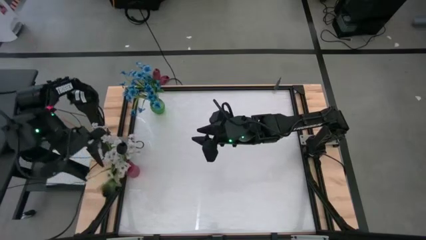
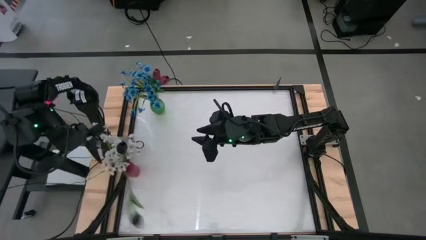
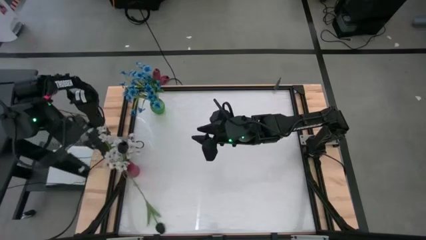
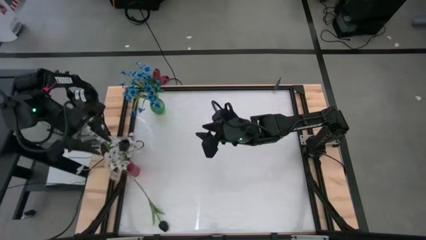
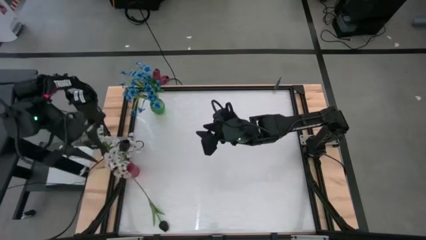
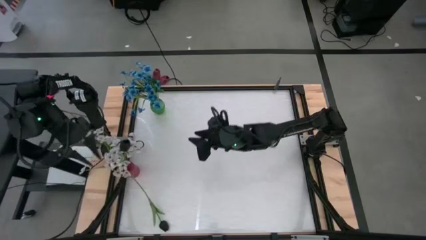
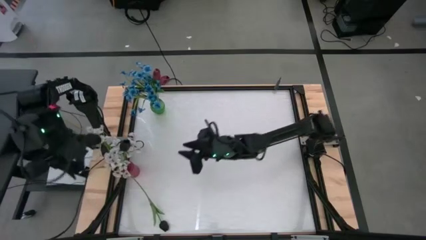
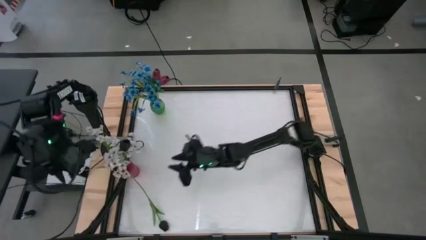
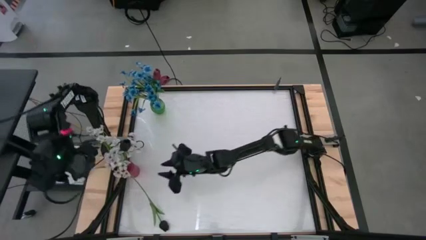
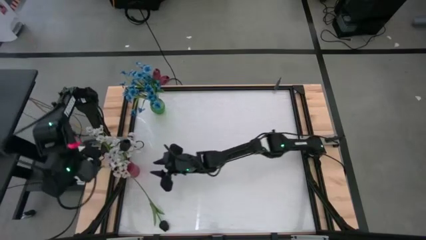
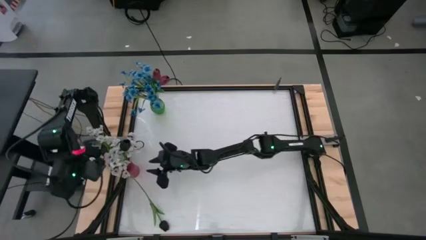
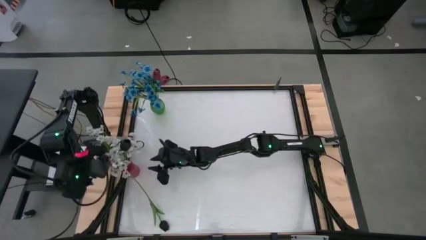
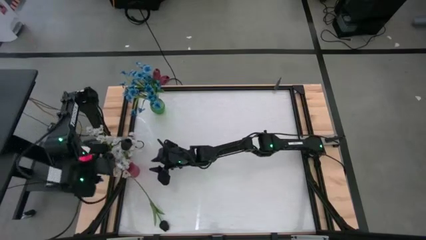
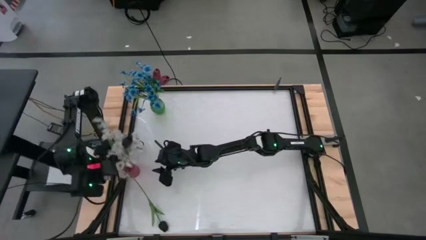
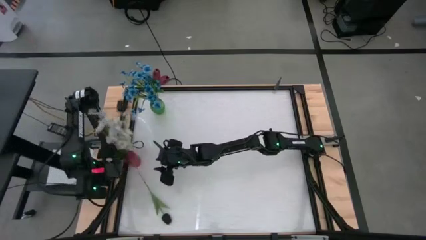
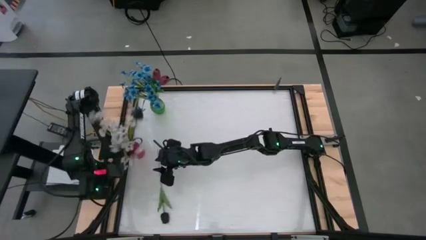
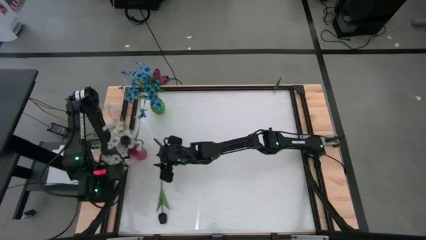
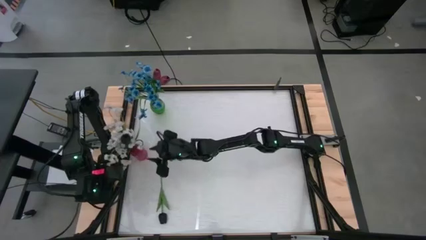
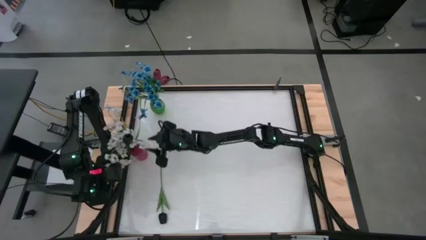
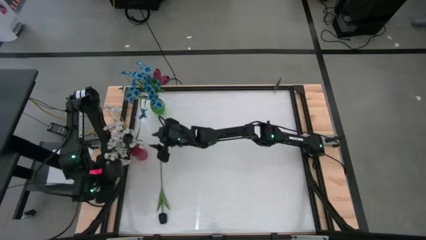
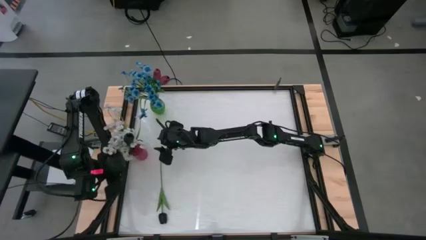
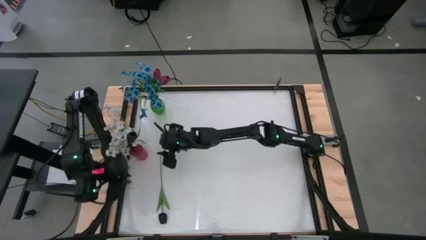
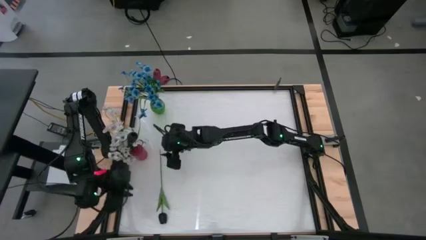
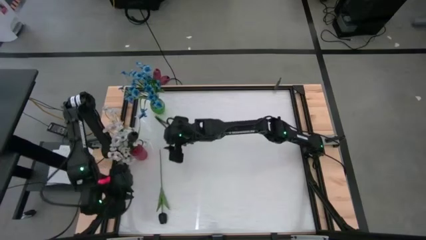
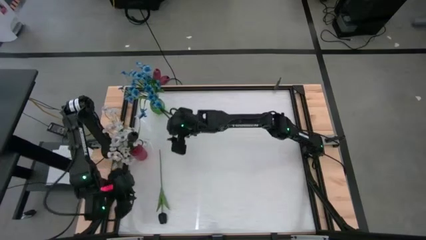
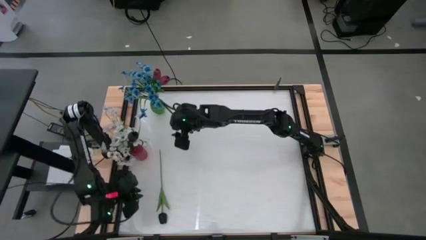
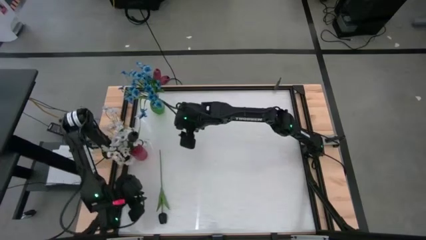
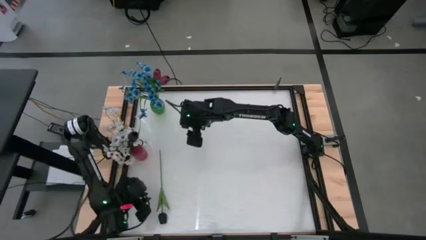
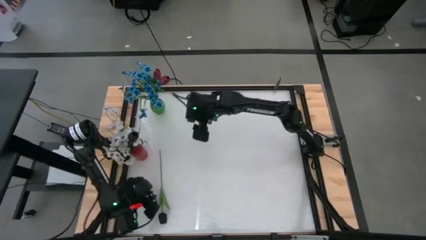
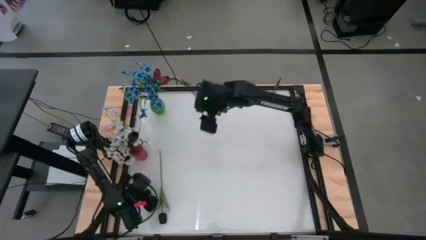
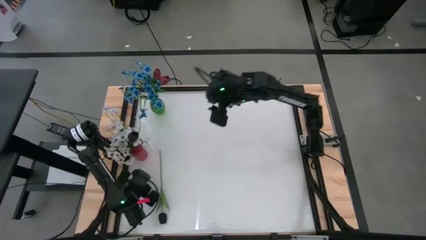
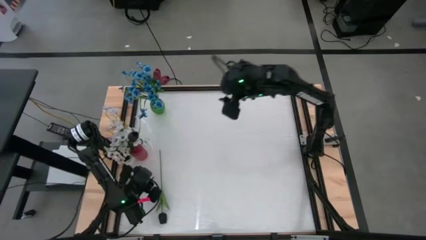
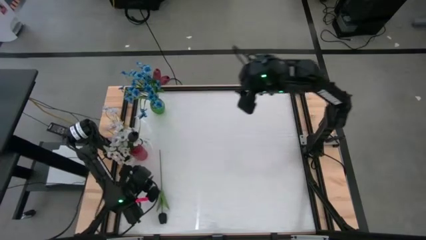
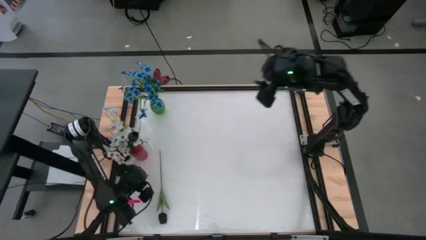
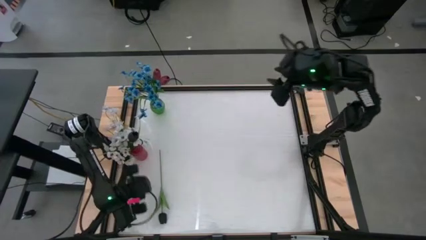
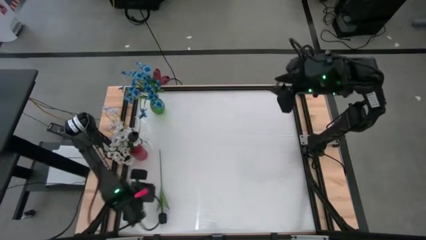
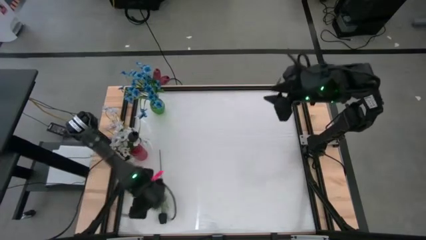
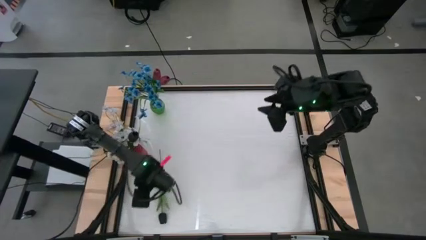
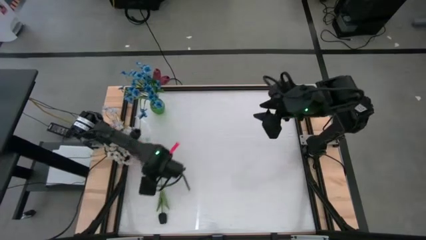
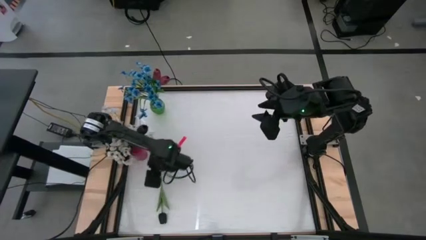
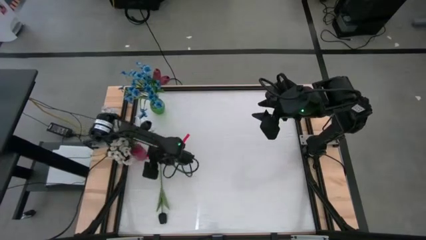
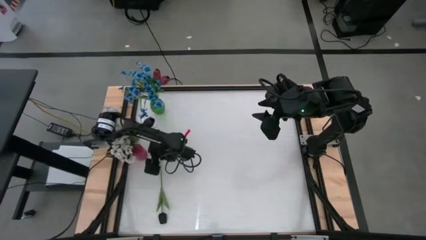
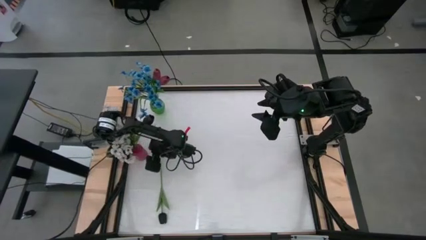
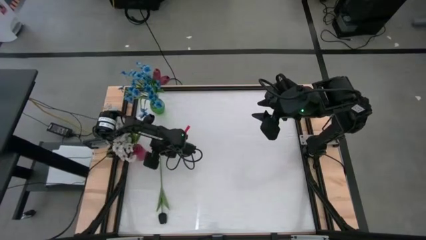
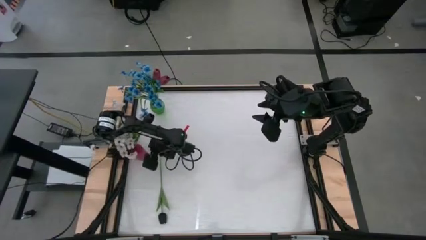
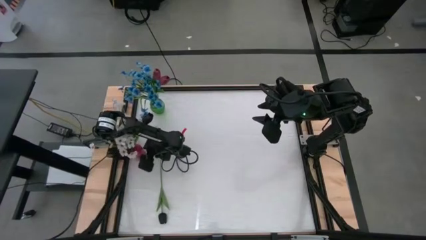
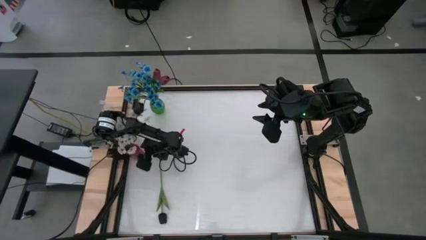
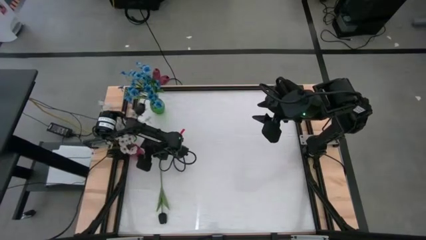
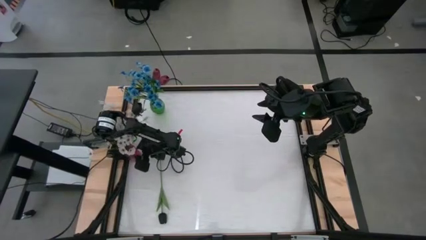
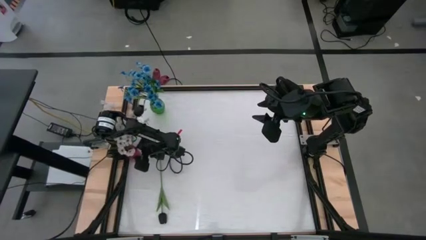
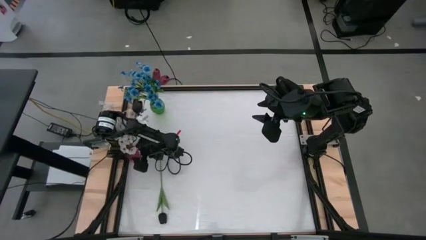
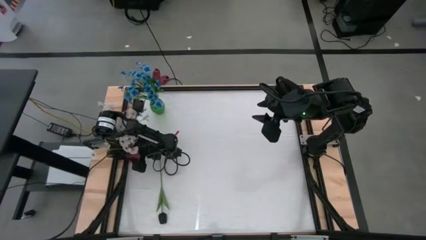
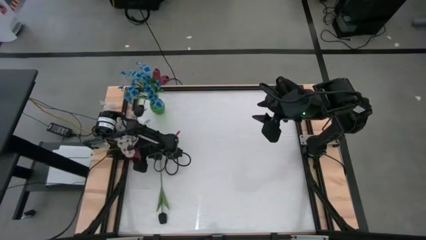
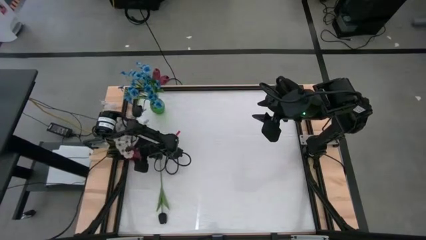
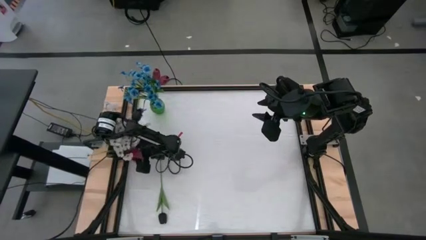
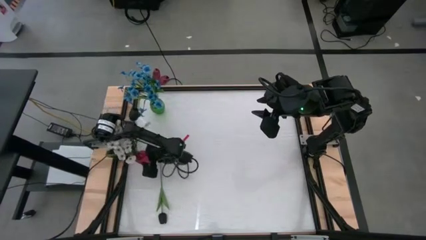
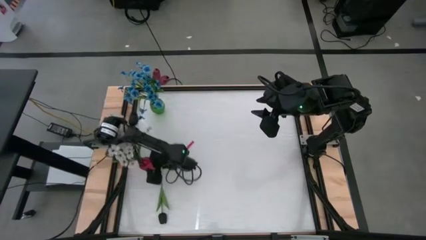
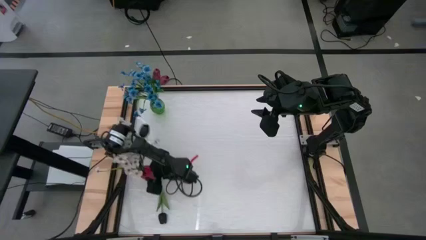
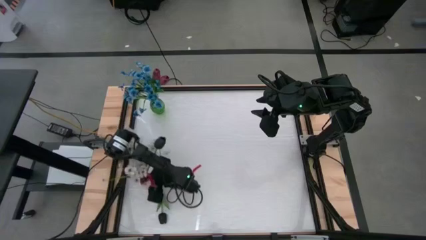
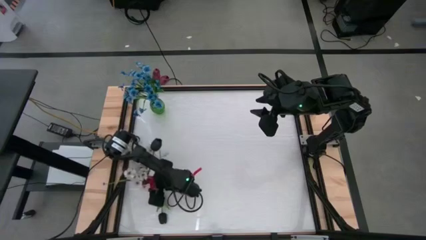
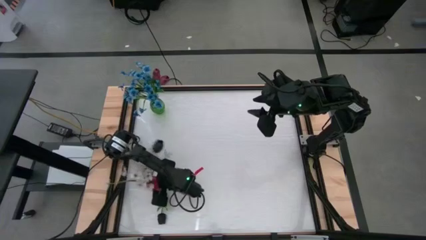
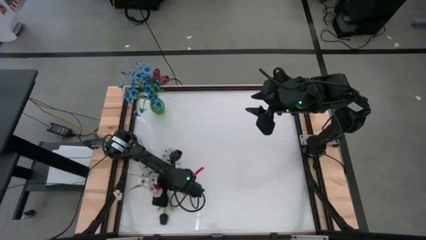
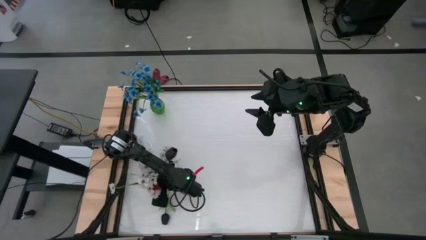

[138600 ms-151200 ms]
Task: Sort flowers into vase by color
Adjust the red vase

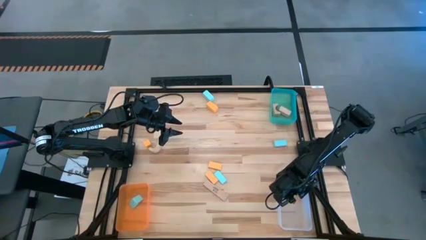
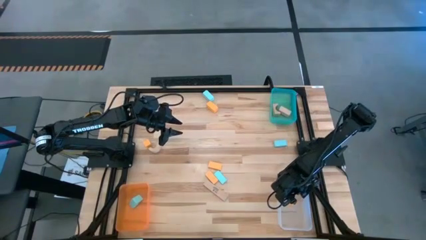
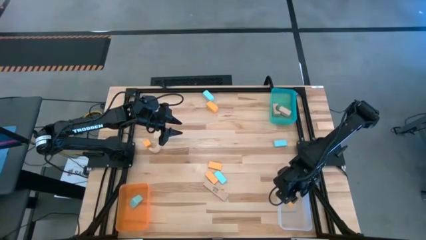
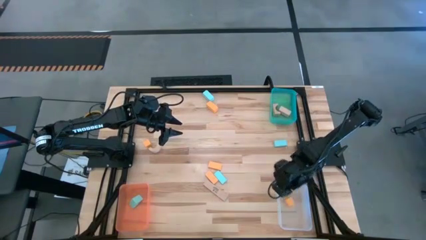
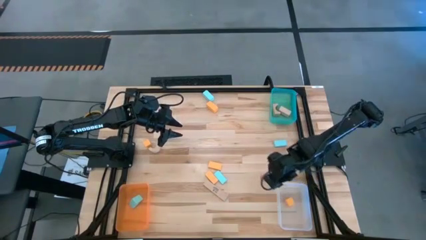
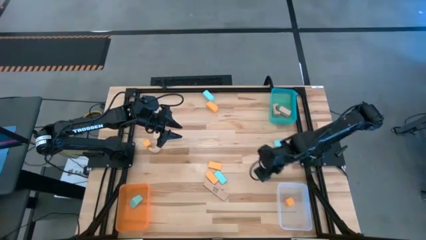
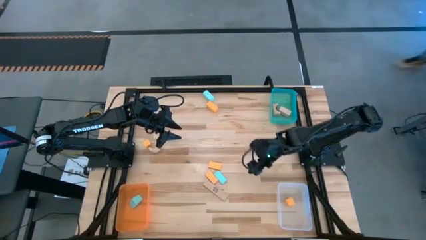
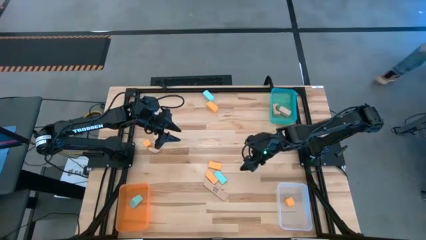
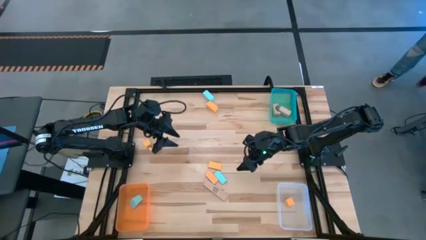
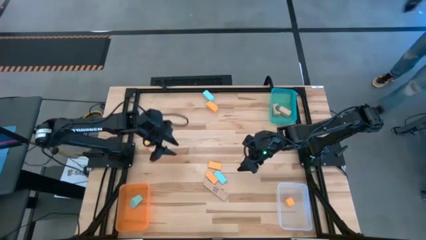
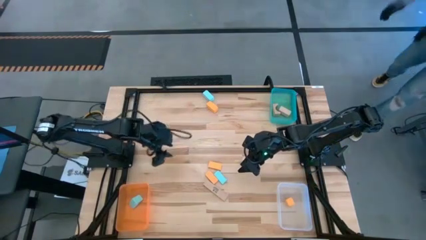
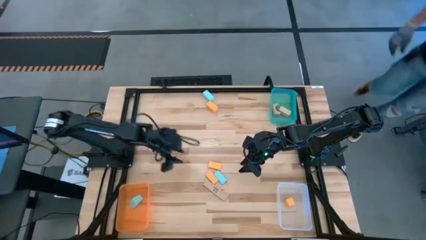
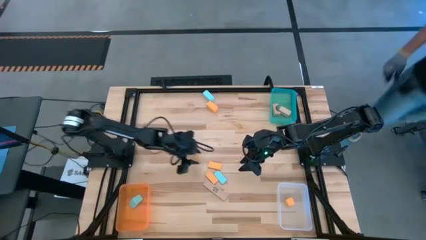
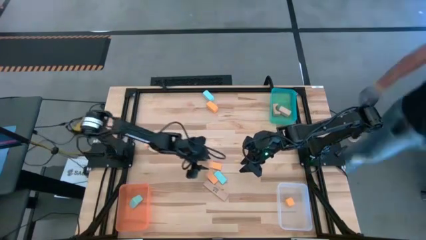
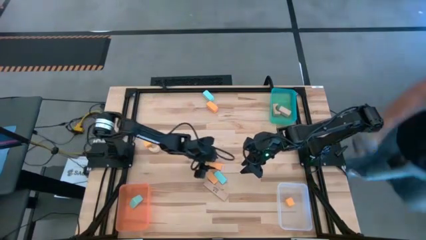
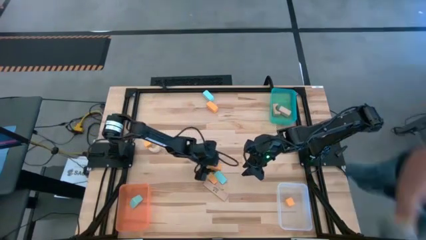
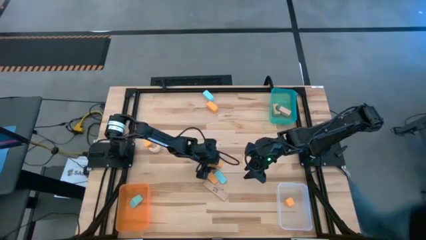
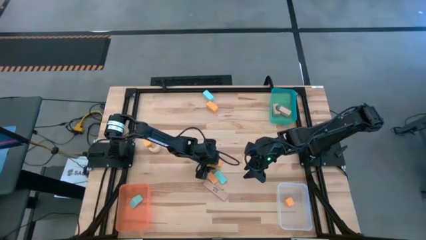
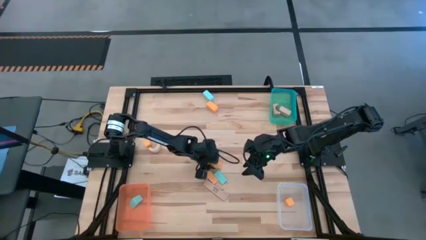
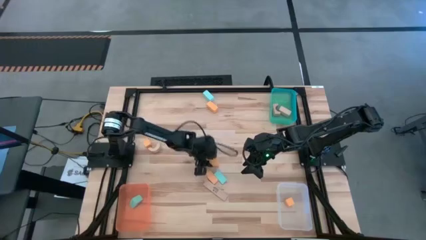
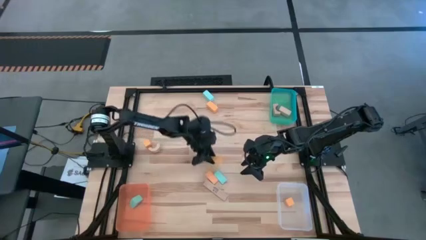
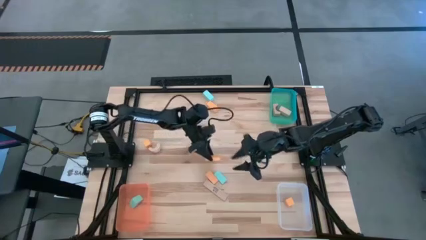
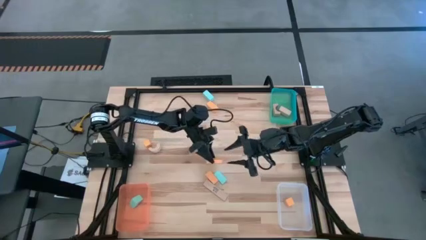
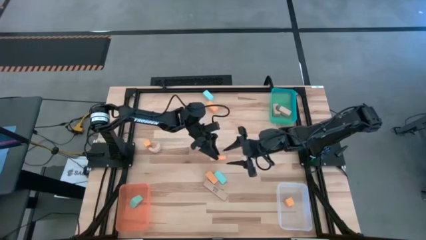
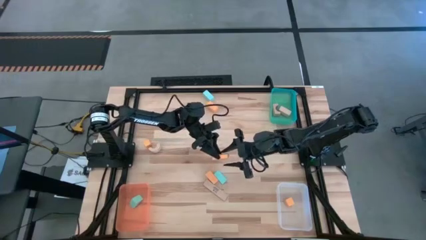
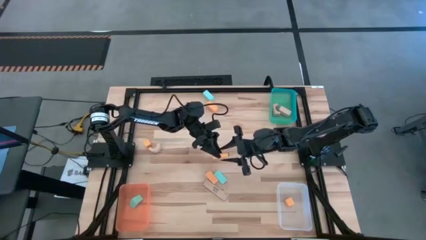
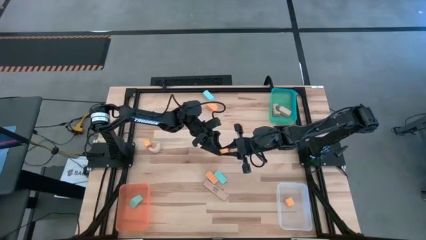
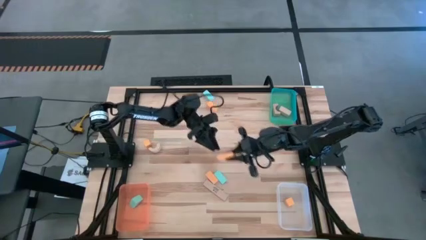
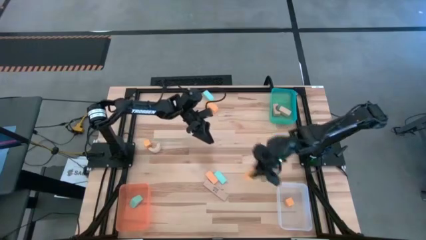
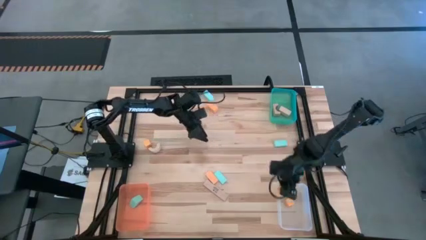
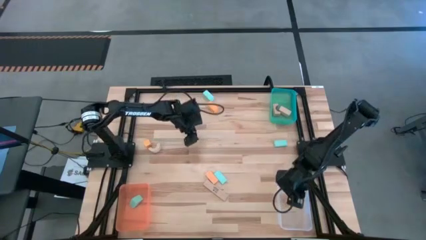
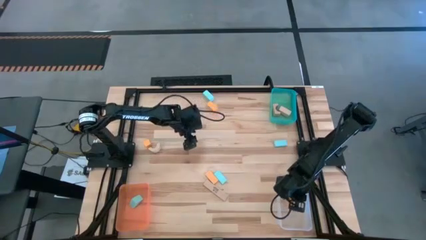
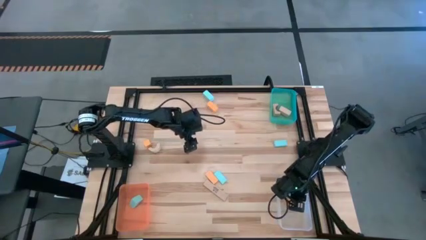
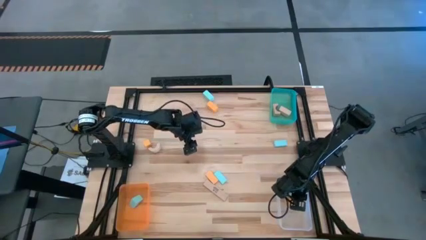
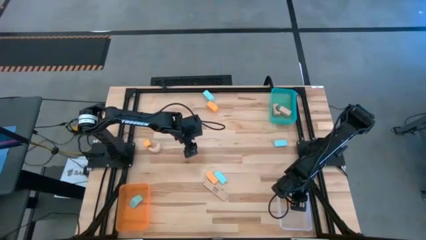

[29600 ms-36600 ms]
Task: Sort & place blocks by color
Put the yellow block into the transparent bin
